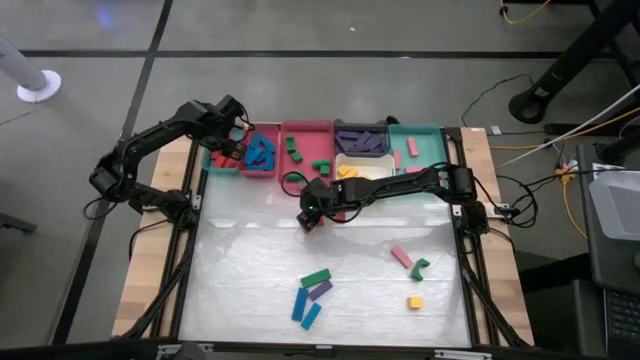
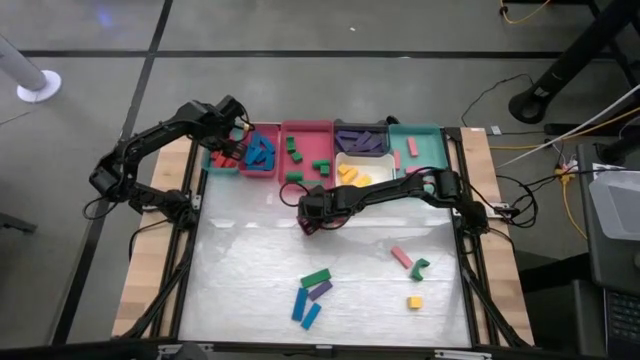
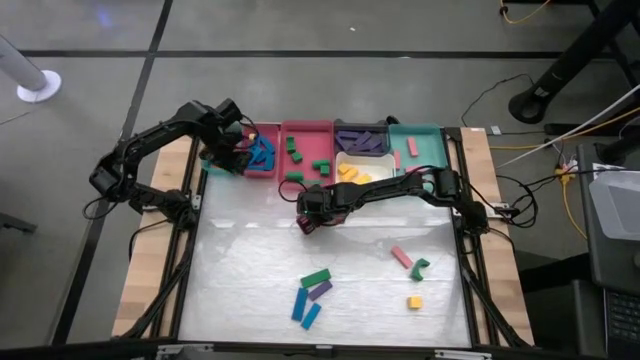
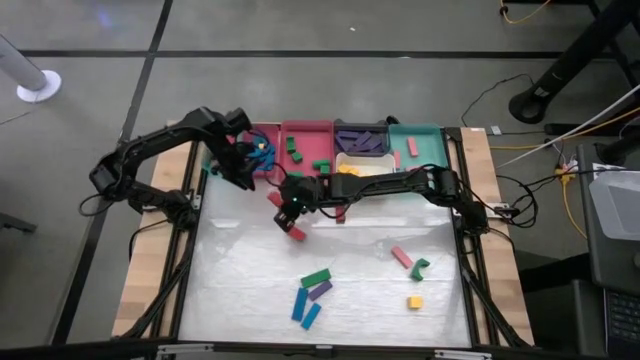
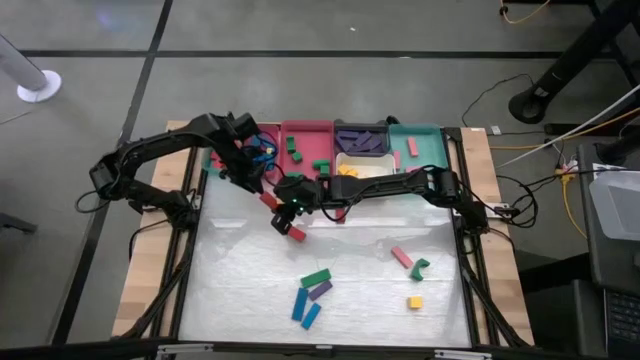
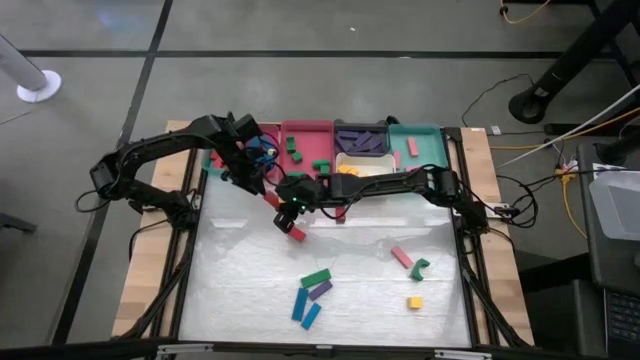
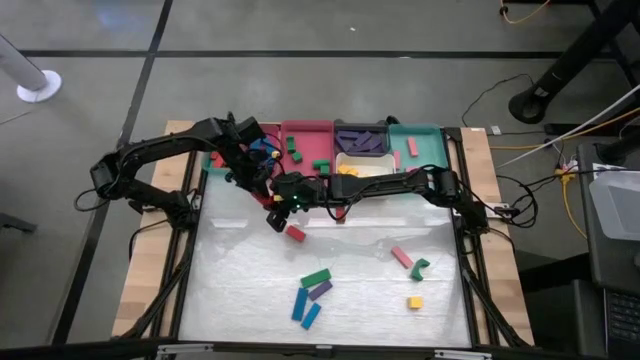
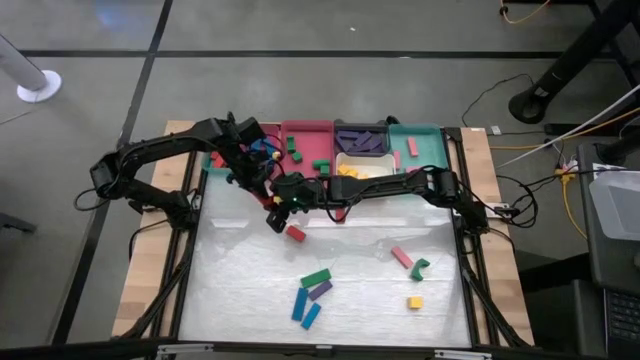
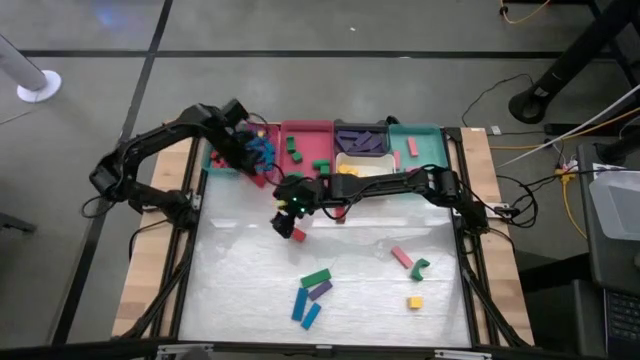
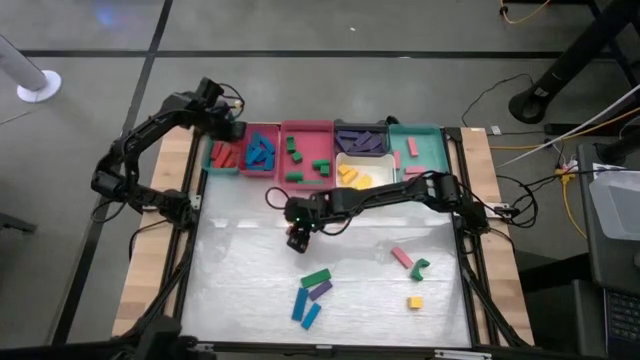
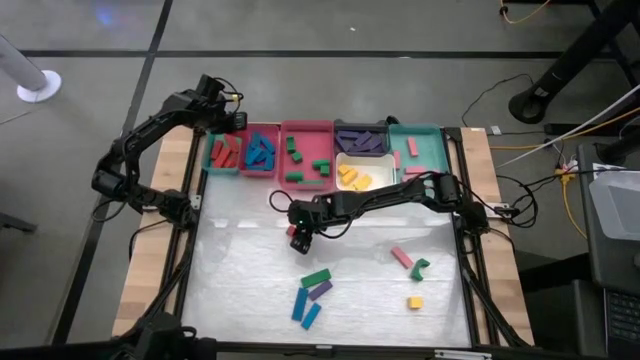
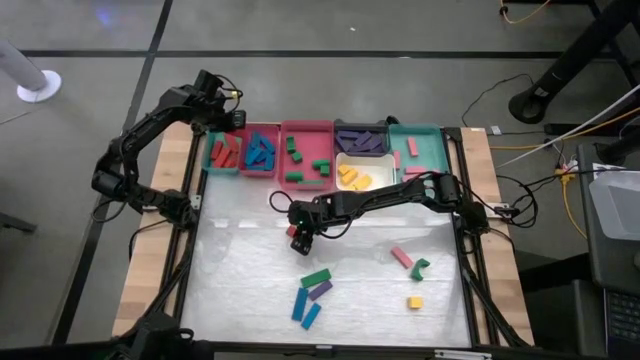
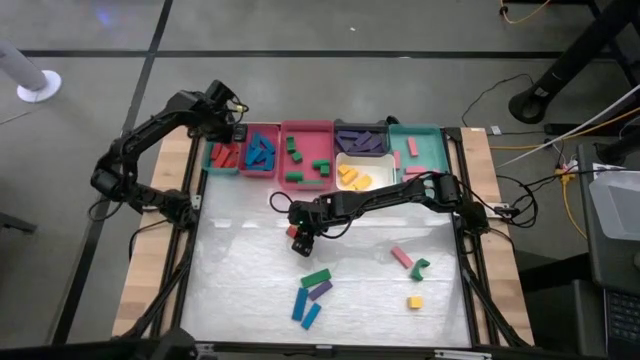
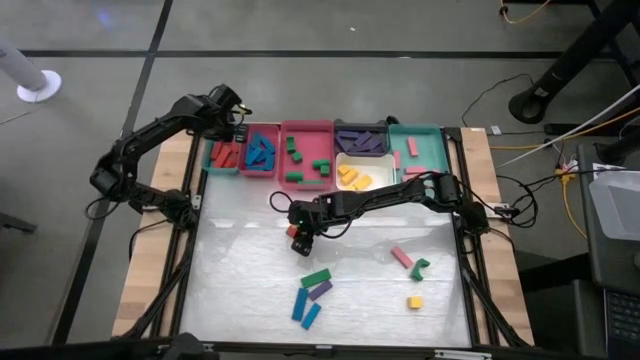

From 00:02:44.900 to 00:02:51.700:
Task: Sort blocks
Put the red block into the left green bin

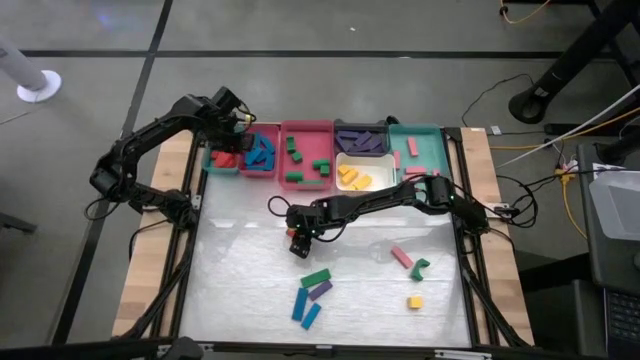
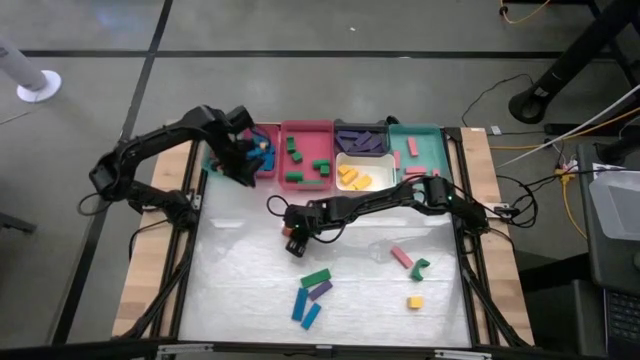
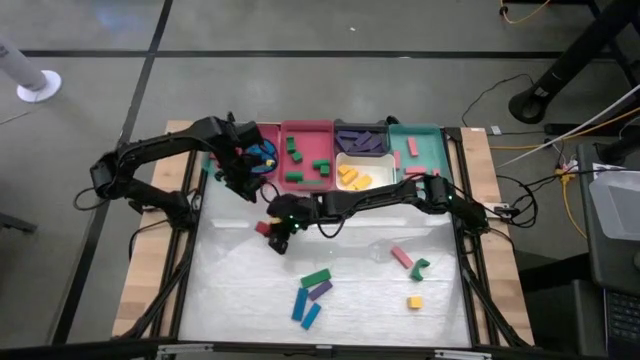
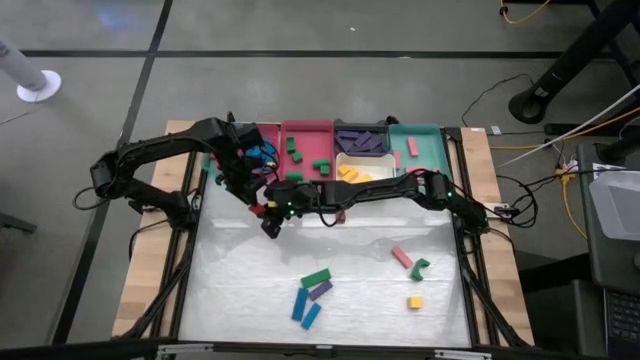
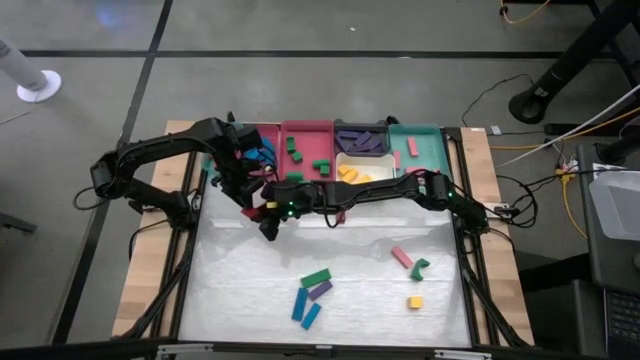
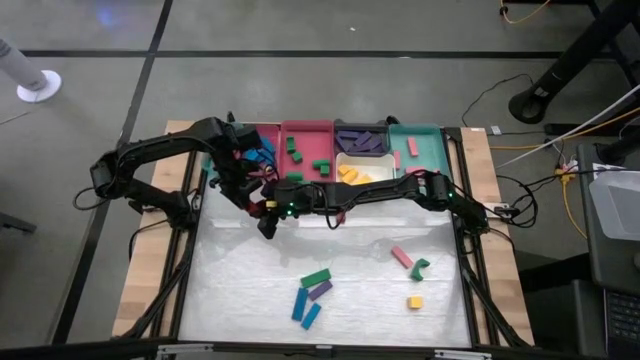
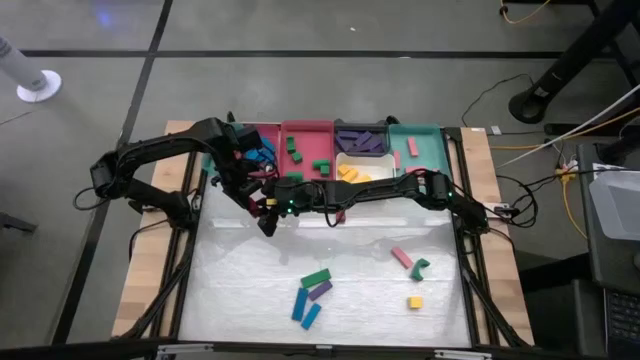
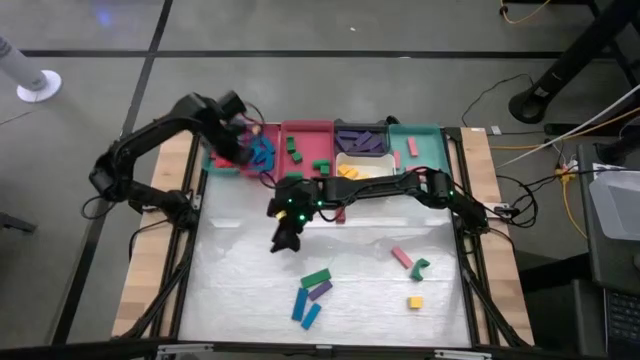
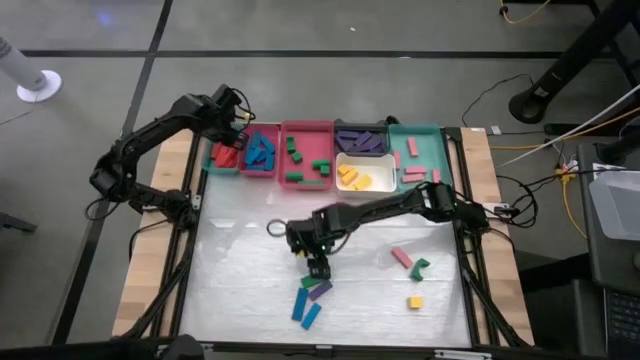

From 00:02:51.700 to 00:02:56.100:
Put the red block into the left green bin

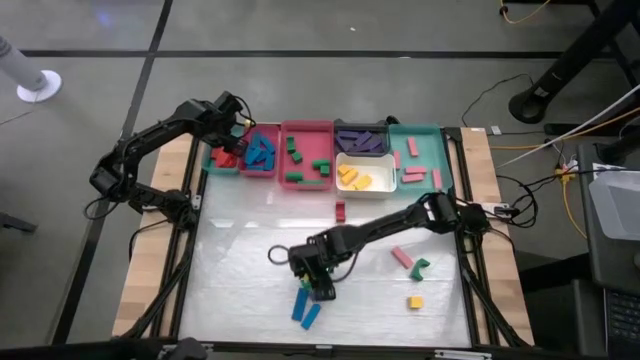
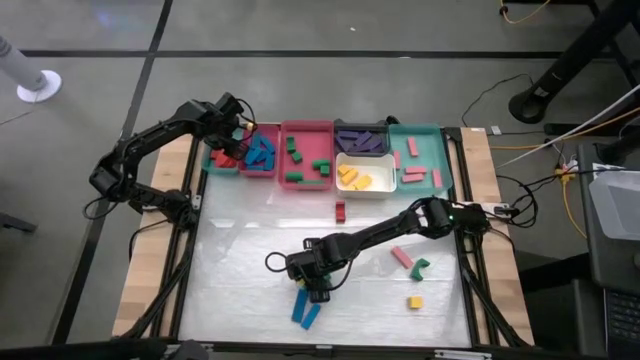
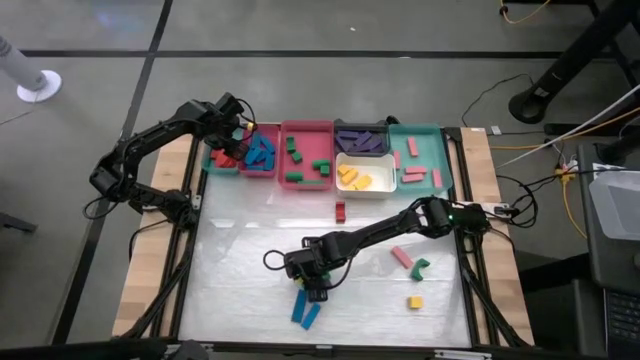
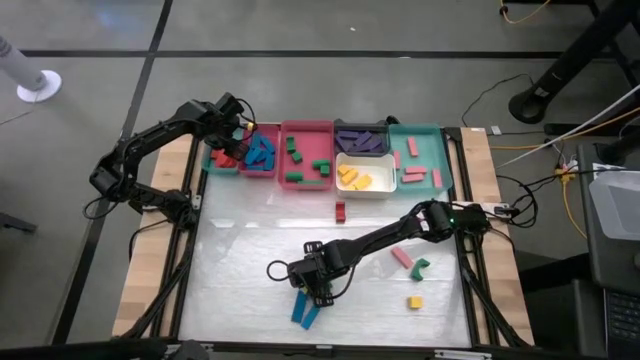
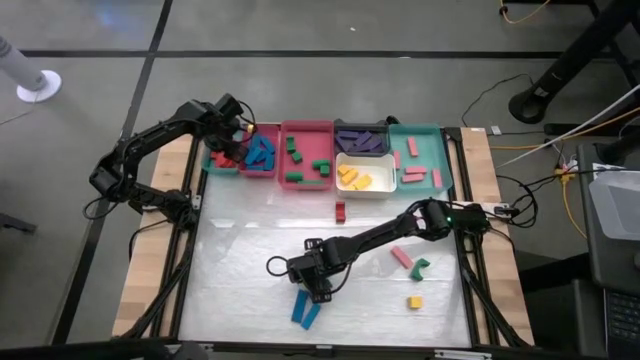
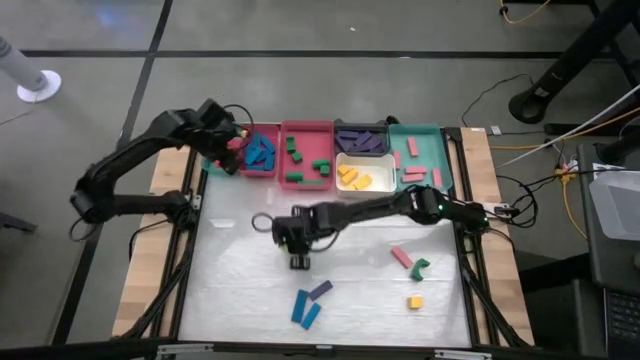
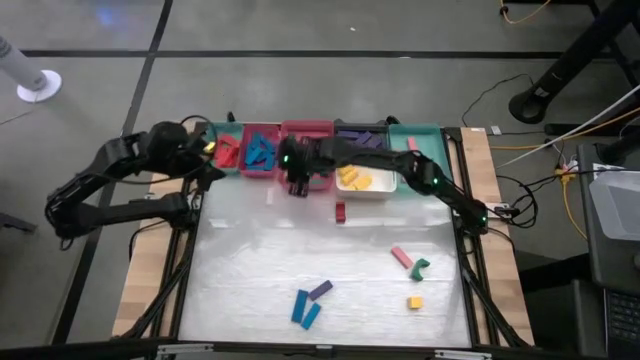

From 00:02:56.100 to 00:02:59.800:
Put the green block into the right pink bin

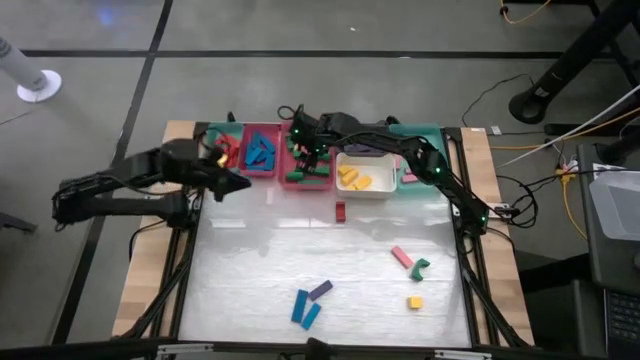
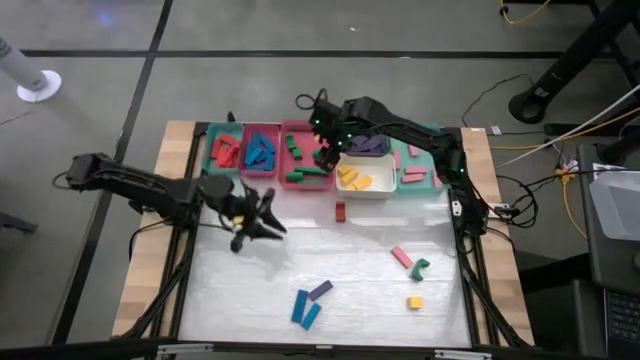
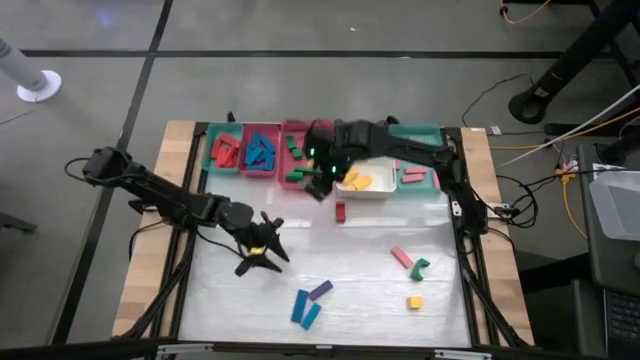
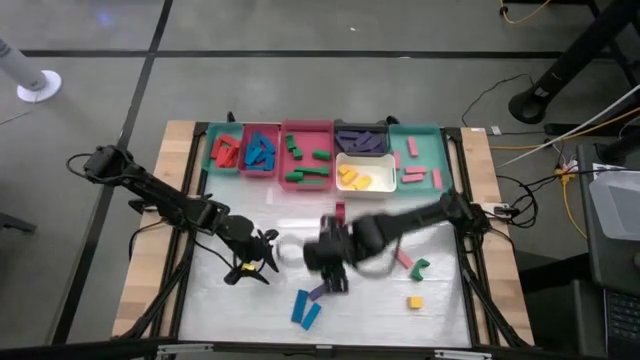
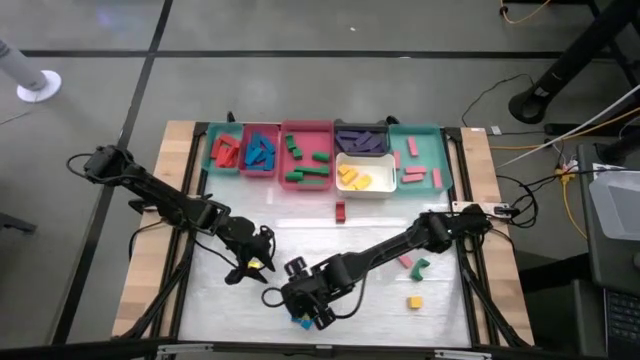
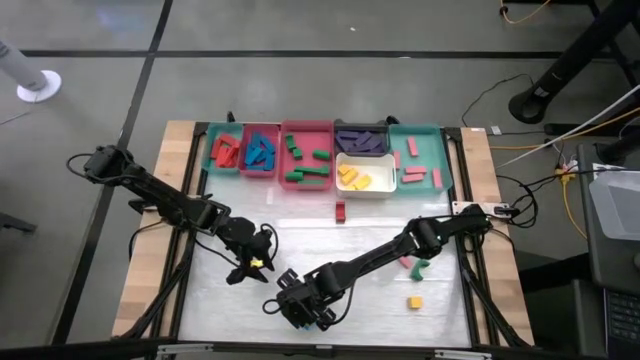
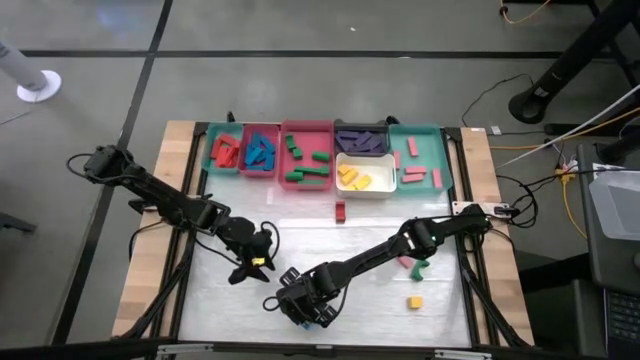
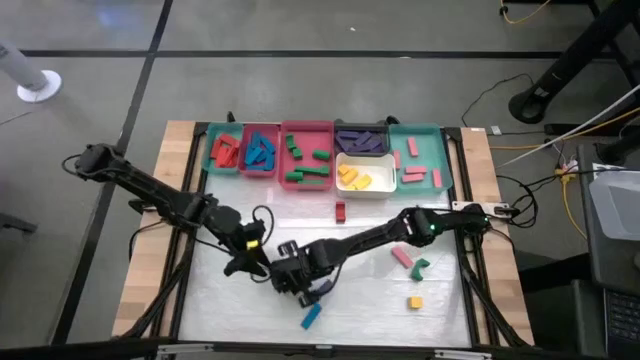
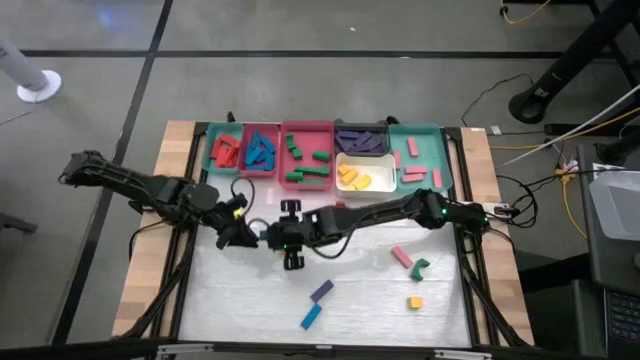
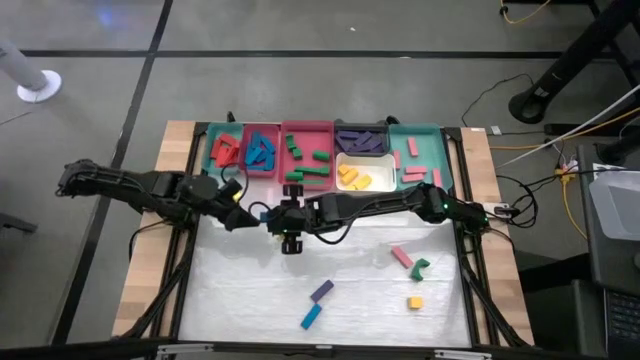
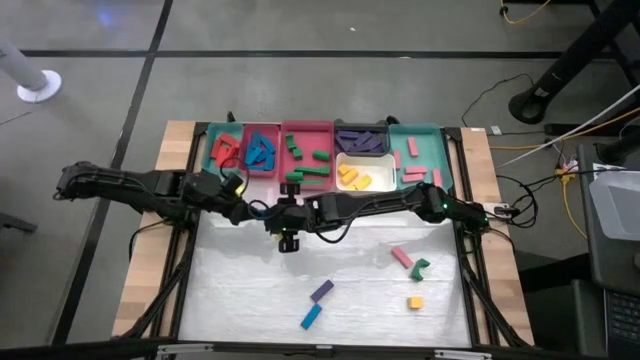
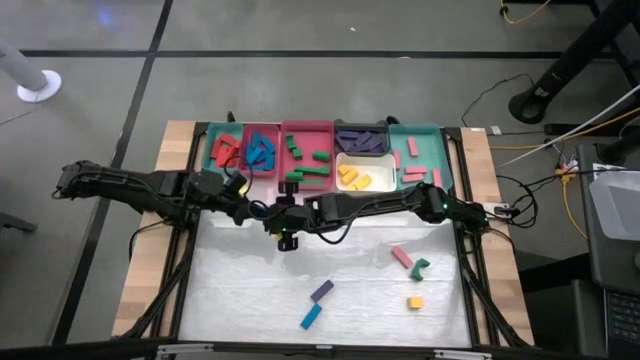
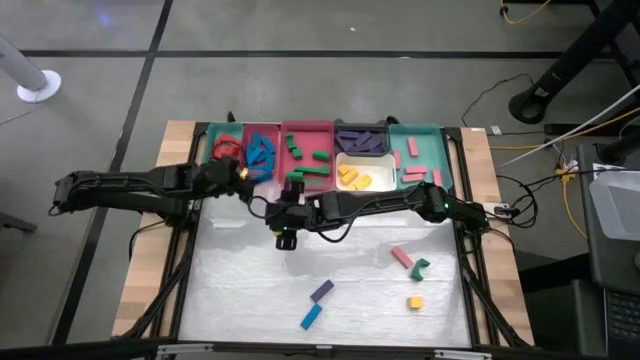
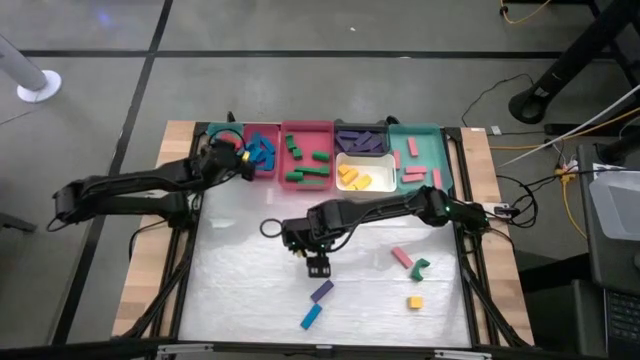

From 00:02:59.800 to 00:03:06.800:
Put the blue block into the left pink bin
